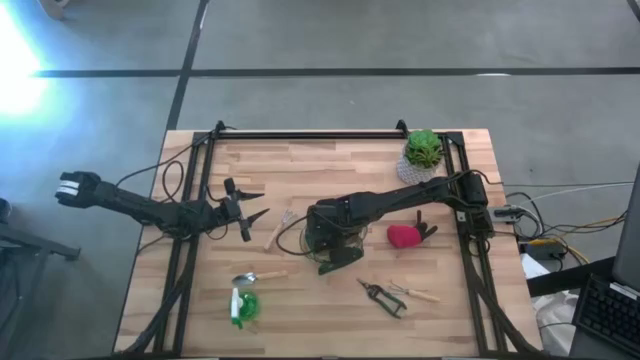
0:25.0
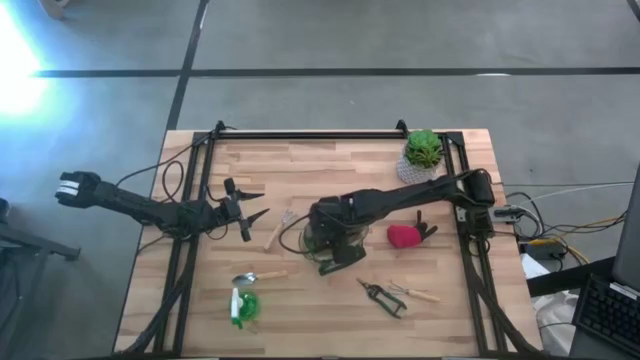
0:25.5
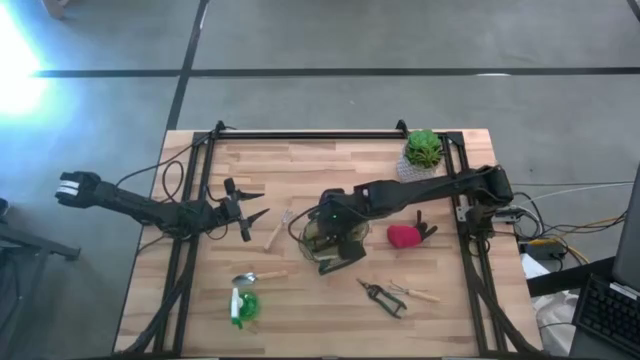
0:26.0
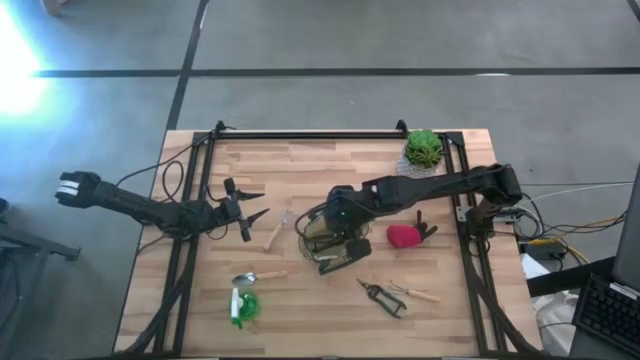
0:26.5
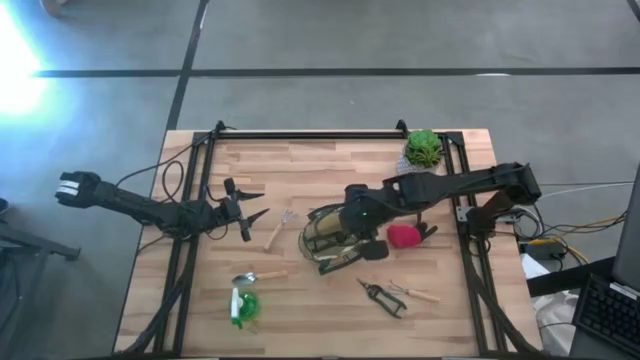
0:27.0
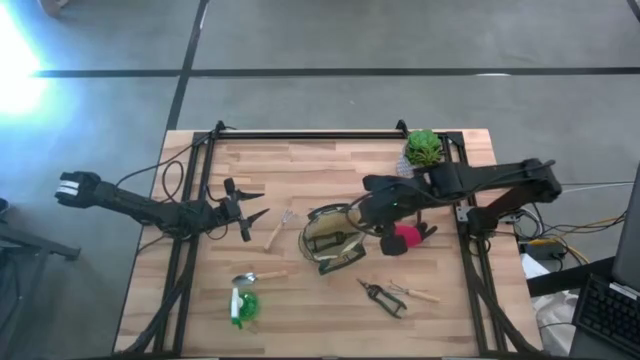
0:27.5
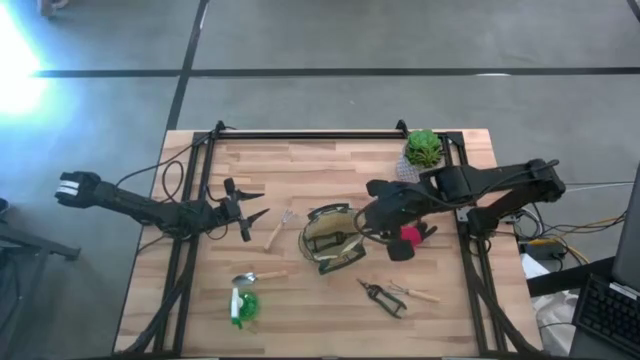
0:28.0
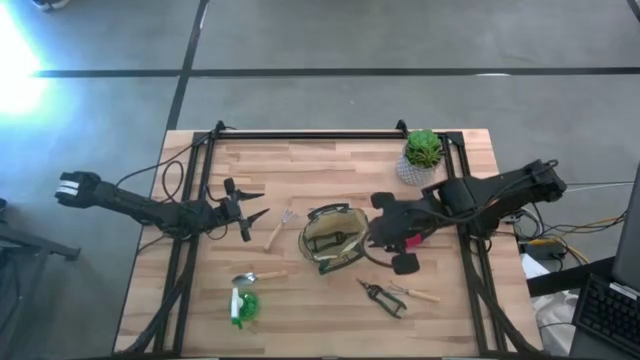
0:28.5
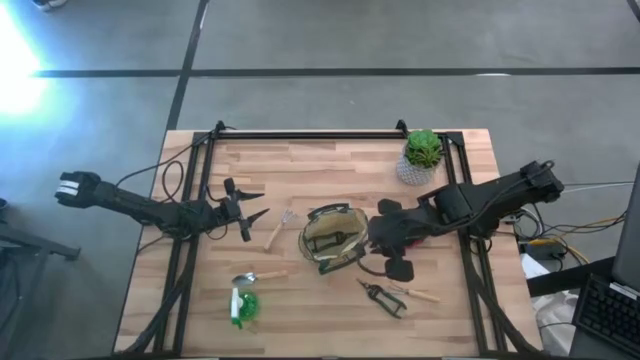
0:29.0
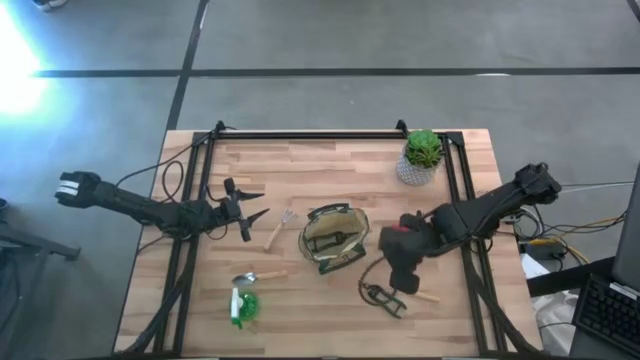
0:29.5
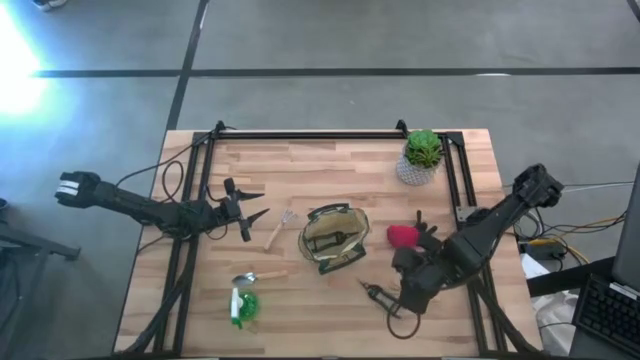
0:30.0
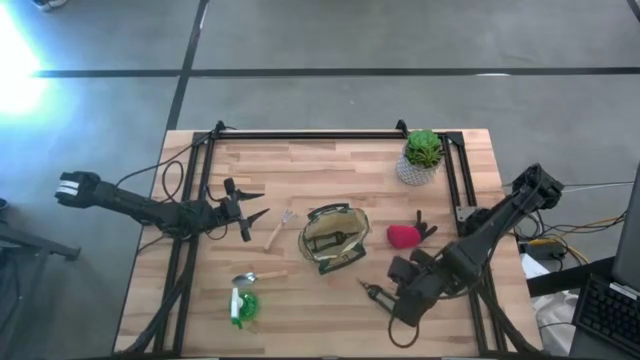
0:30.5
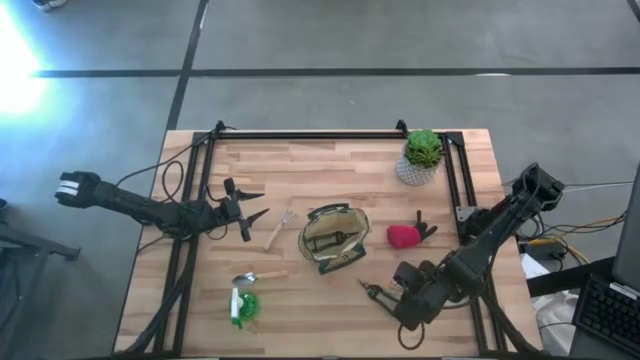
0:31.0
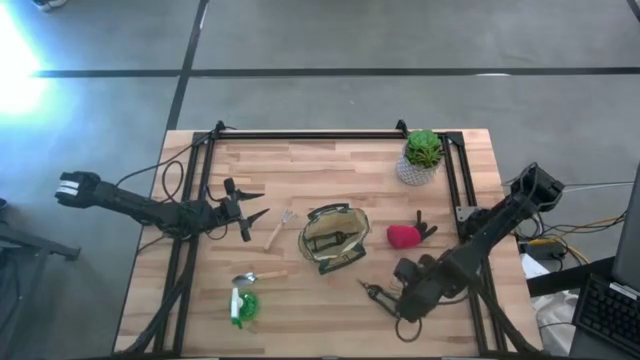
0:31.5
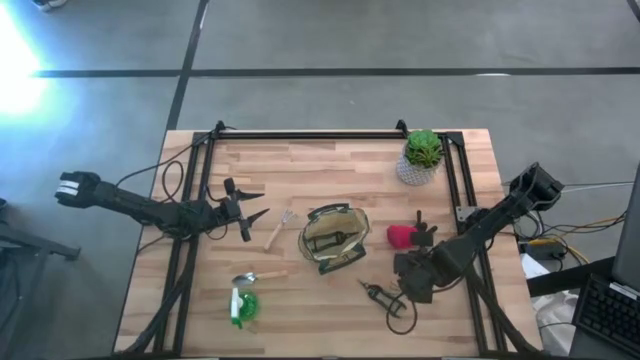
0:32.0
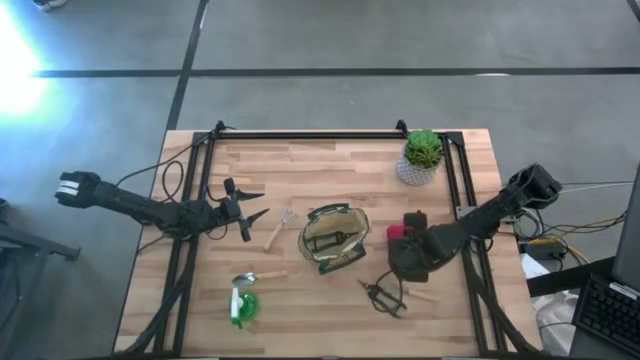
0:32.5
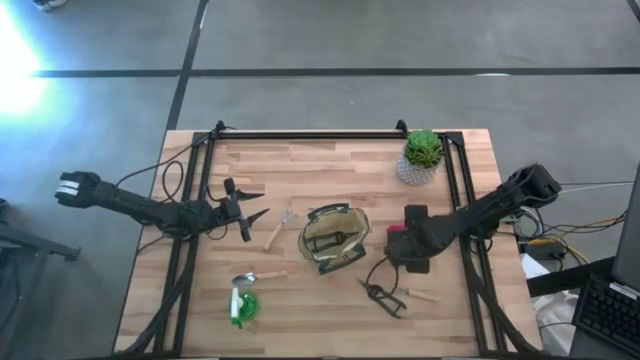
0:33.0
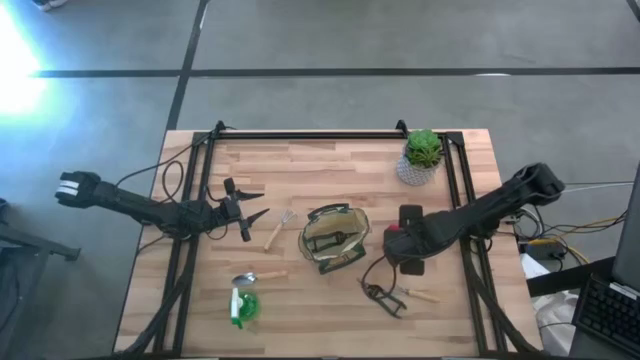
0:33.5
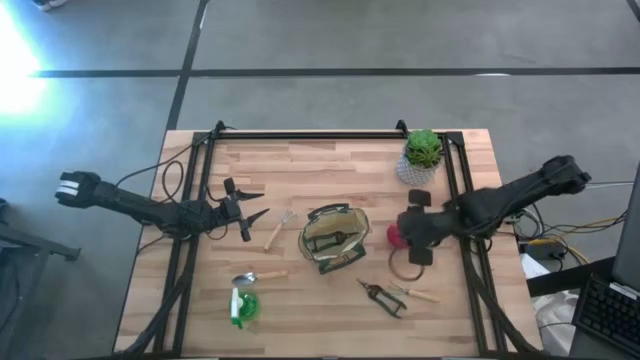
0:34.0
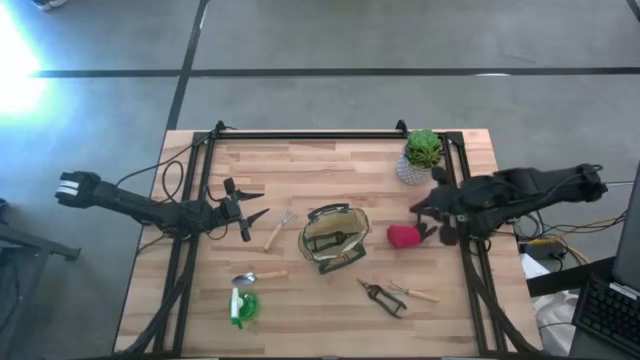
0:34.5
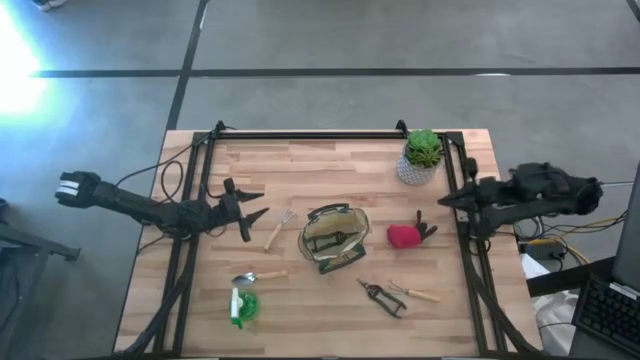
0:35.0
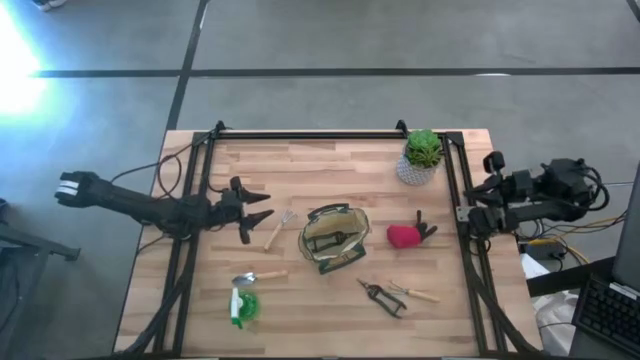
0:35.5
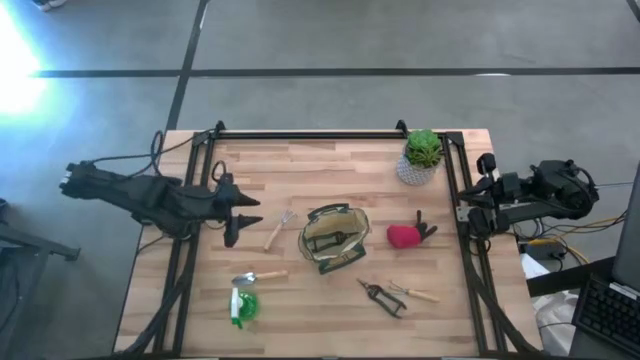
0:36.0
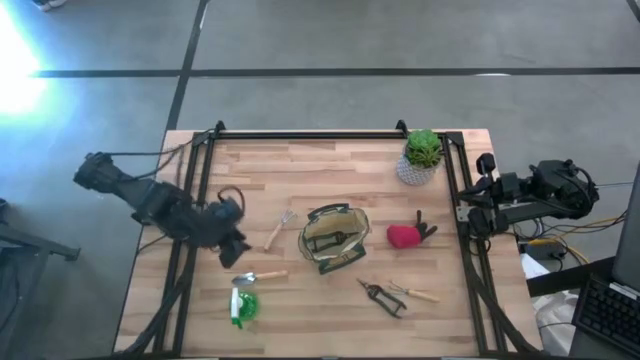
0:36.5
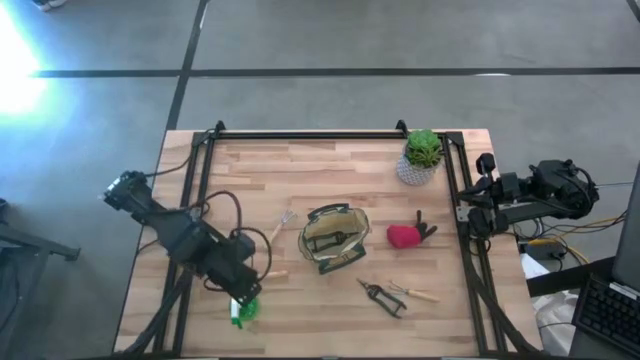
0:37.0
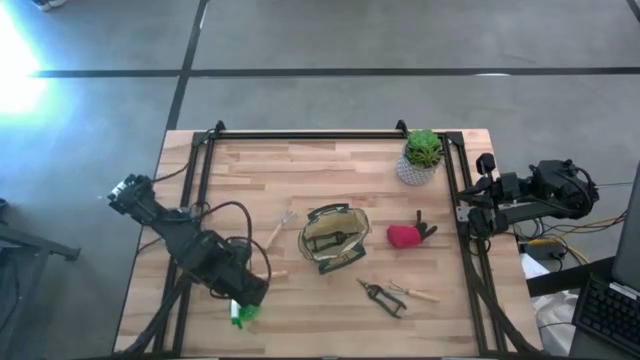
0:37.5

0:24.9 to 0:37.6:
Task: Pick & Place Garden tools in Gardening bag
Put the green spray bottle into the green gardening bag

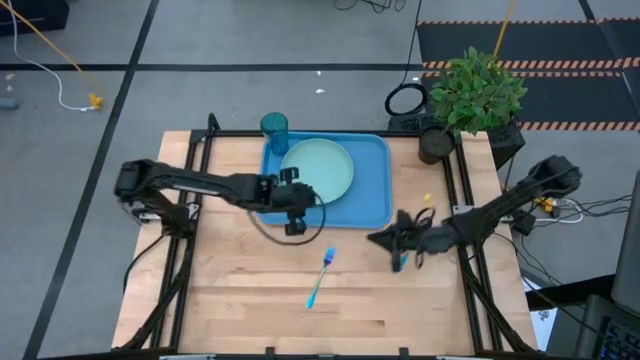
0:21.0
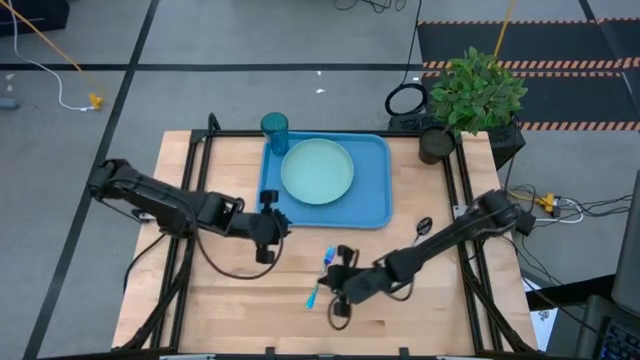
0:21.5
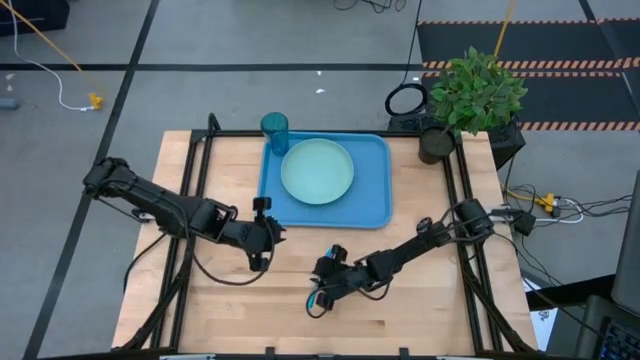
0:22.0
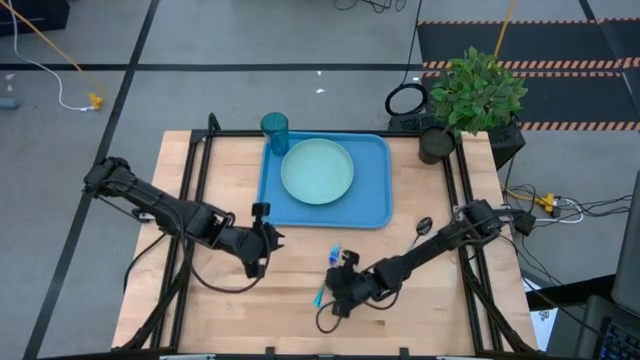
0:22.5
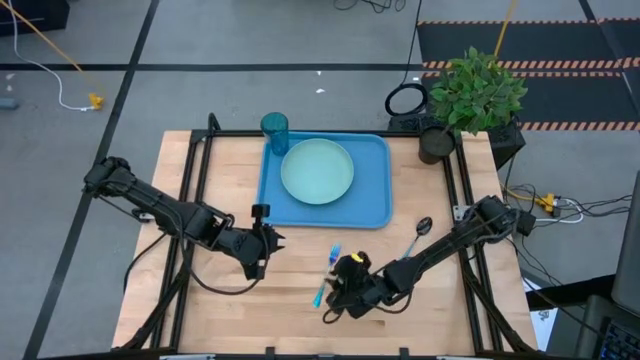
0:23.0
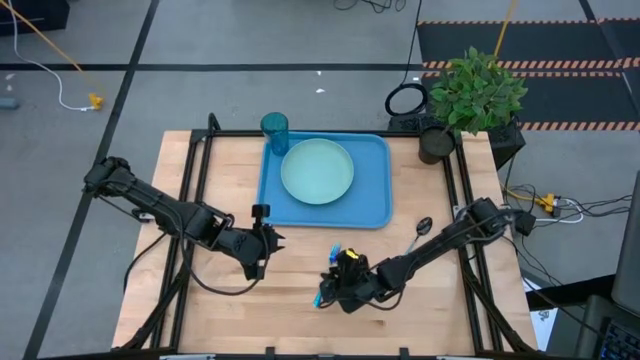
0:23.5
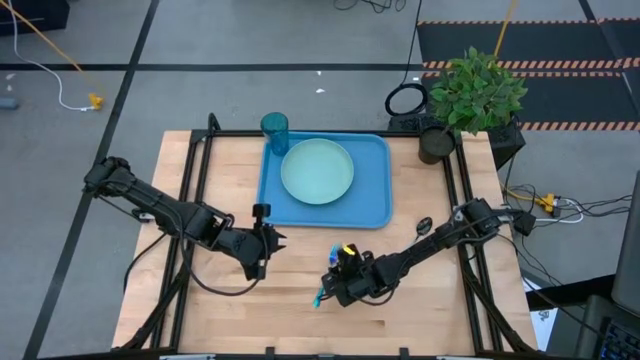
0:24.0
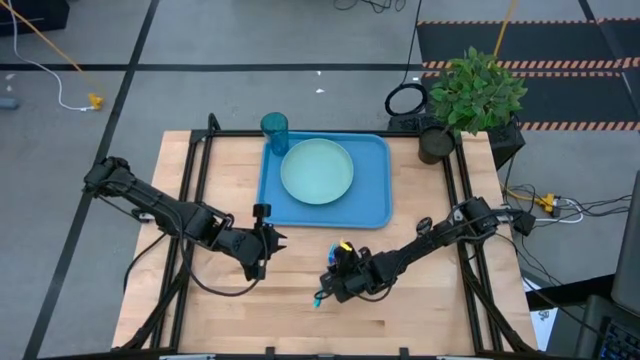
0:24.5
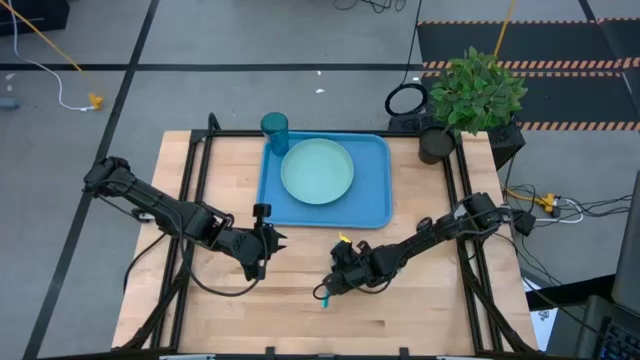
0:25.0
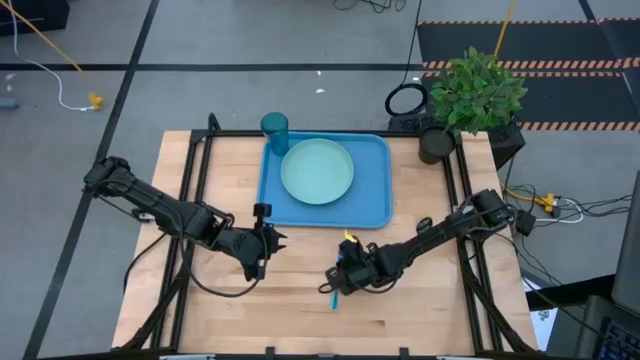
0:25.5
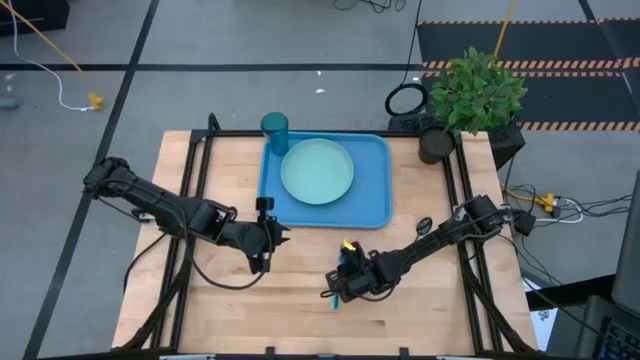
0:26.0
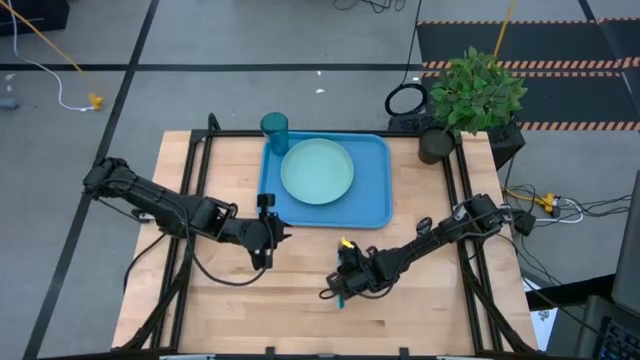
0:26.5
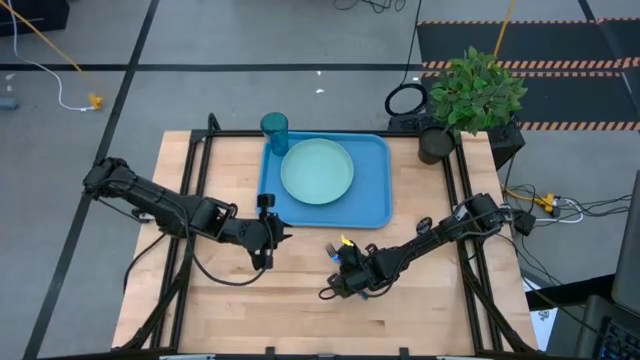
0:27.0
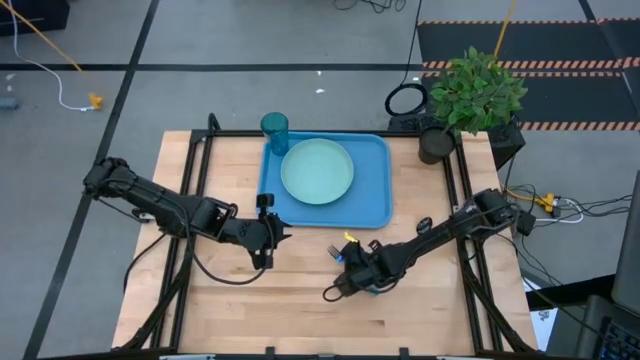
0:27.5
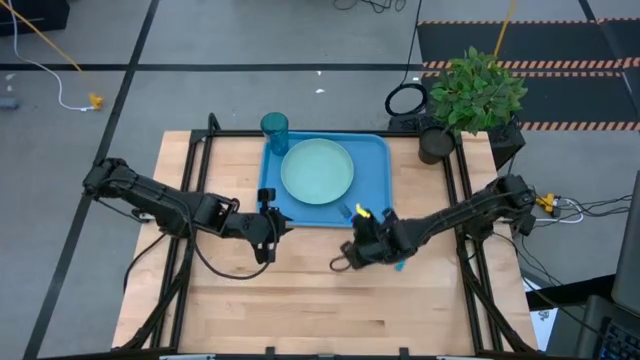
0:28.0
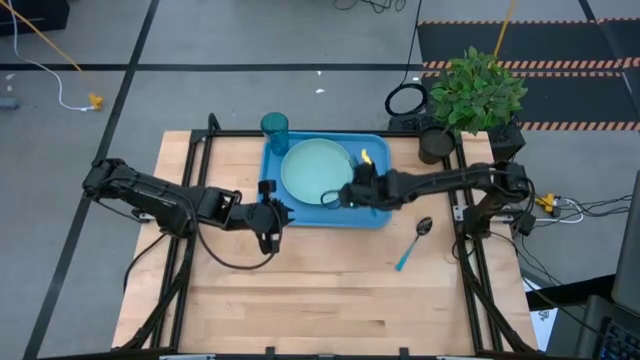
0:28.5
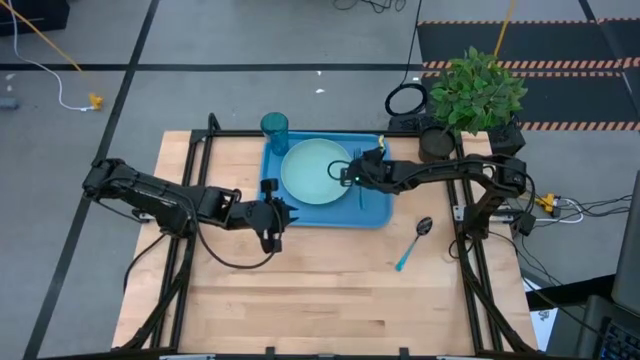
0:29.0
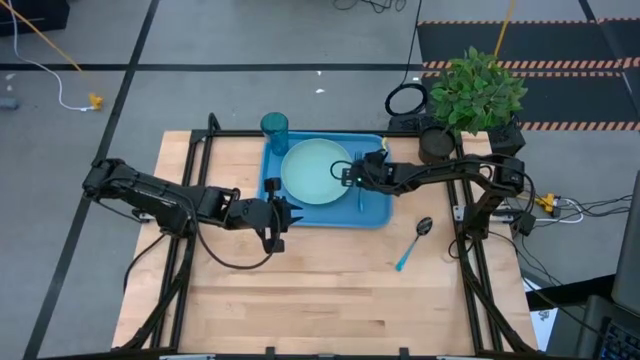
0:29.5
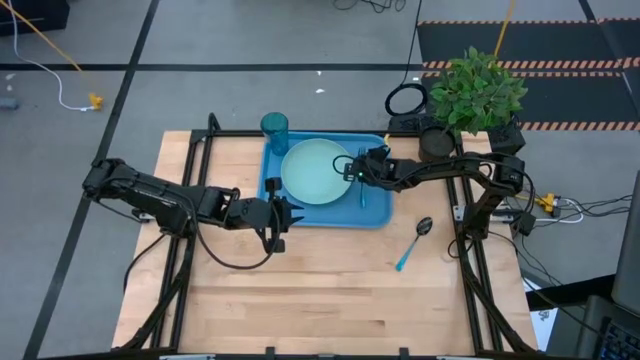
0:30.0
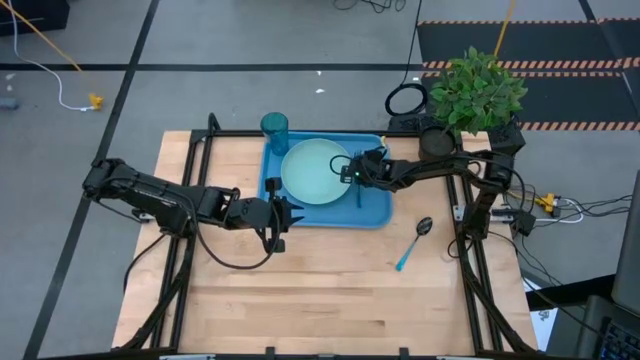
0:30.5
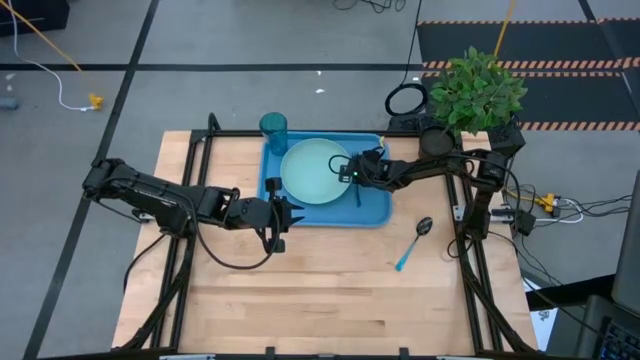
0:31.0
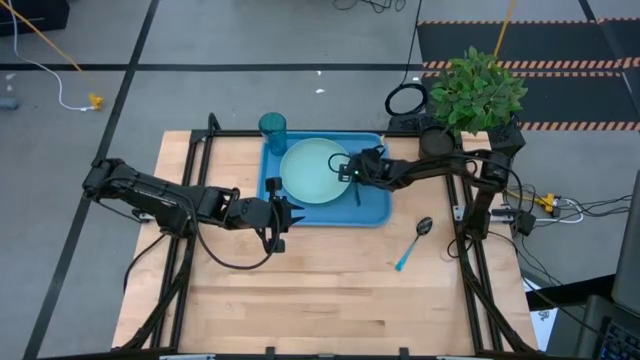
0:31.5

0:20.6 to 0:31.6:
Task: Pick and place plate/cup/fork/spoon on tray
Put the fork on the right side of the plate on the blue tray
